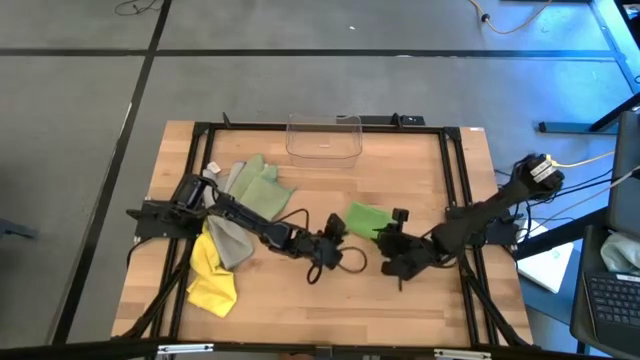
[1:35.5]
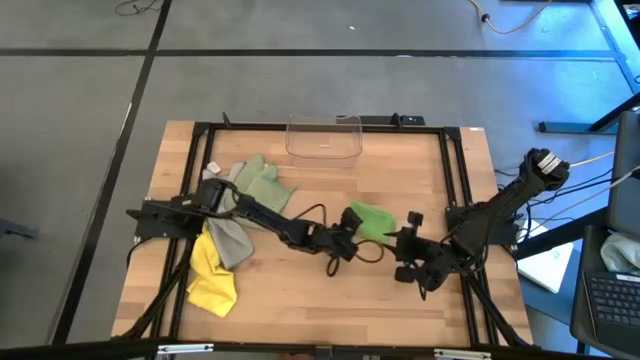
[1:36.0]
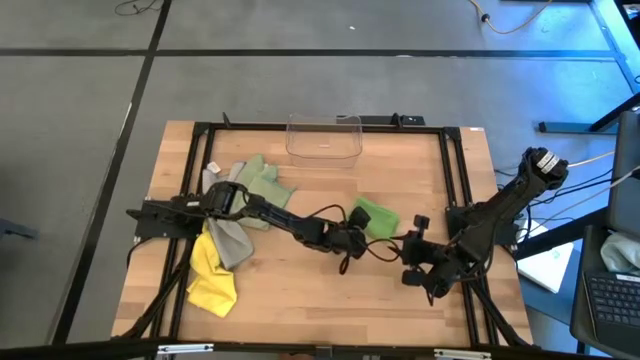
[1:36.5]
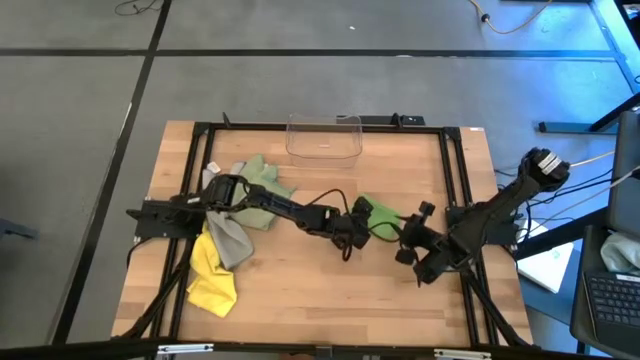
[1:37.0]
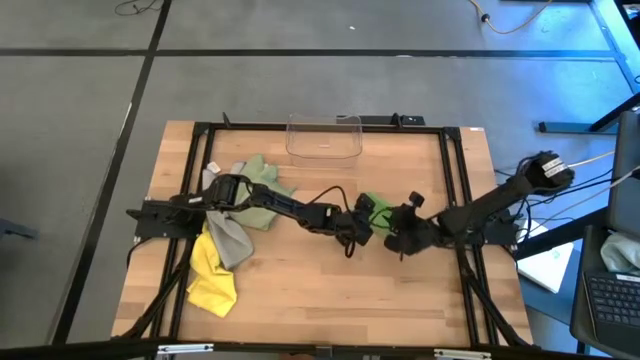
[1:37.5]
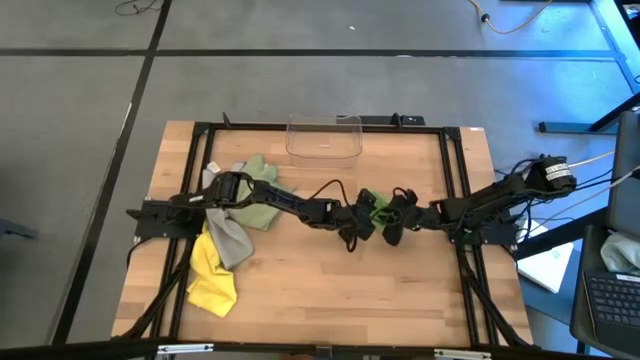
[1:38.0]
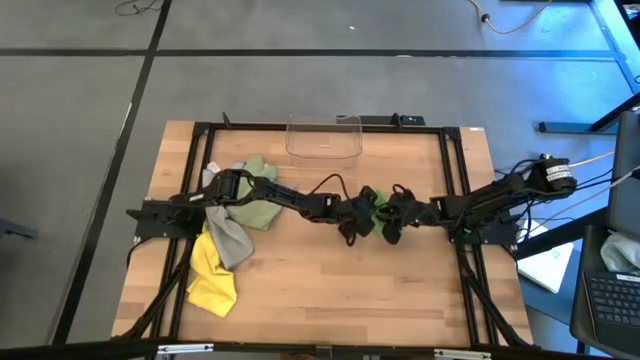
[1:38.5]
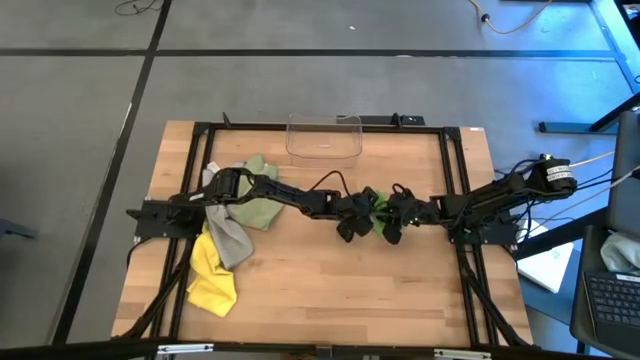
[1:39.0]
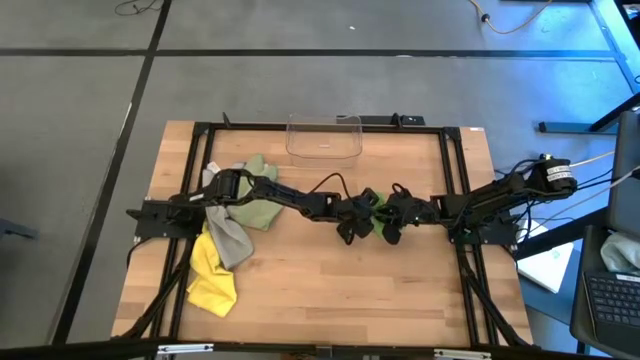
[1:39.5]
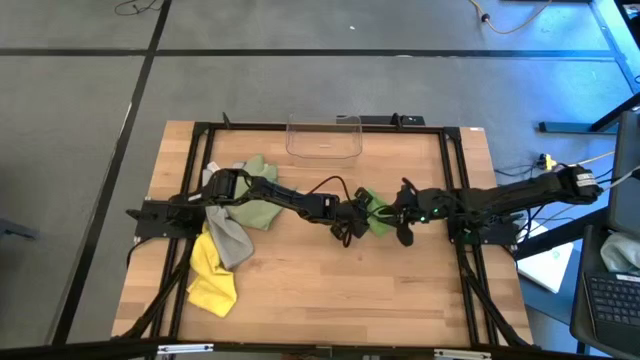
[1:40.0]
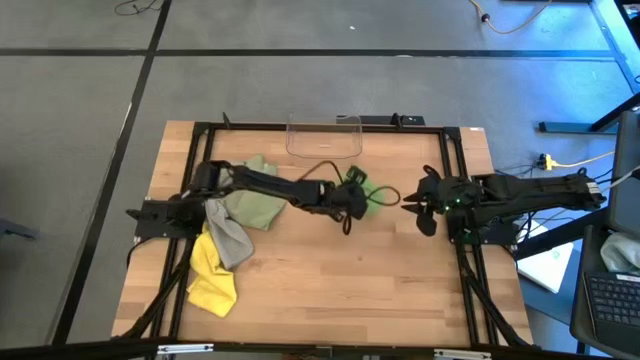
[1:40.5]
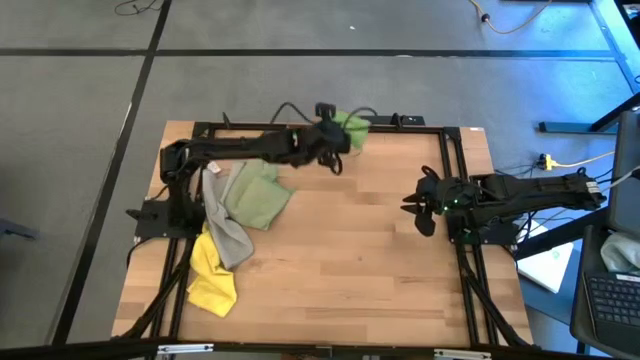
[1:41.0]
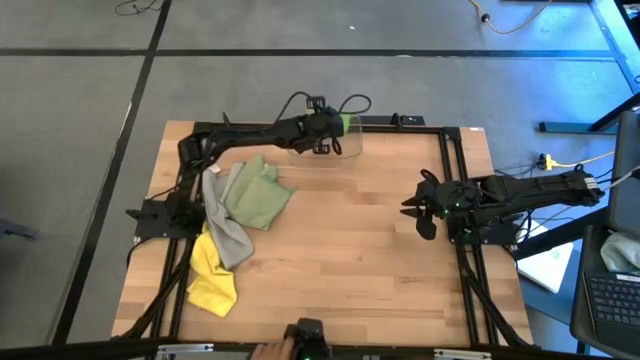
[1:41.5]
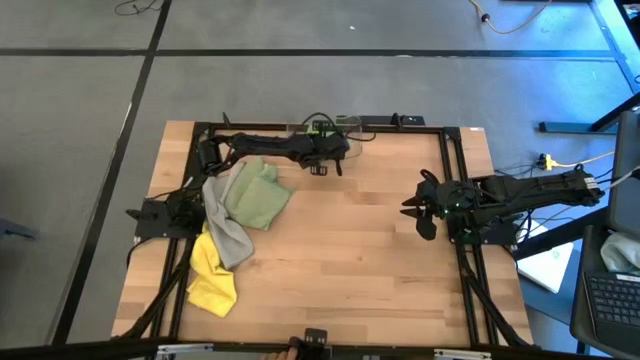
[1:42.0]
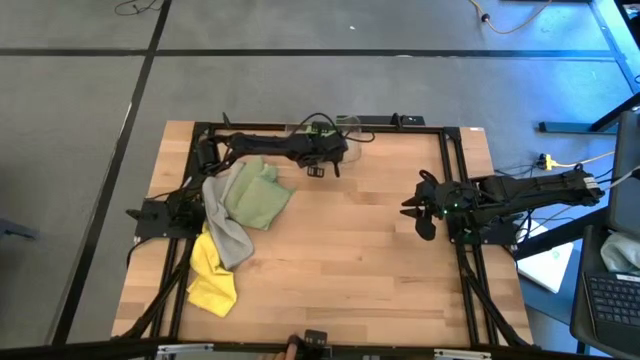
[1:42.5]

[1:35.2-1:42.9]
Task: Fold microfiber towels
Put the green microfiber cloth into the transparent bin

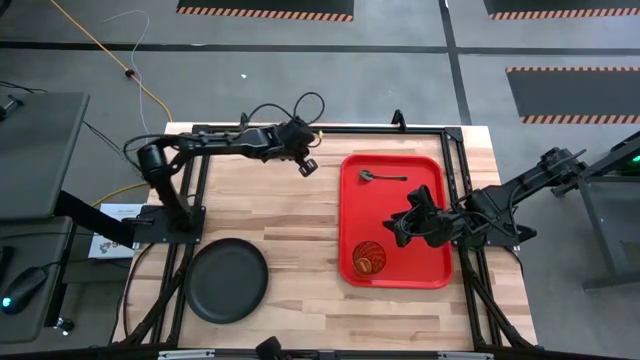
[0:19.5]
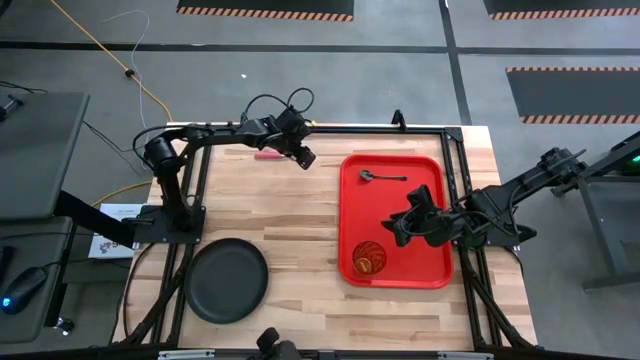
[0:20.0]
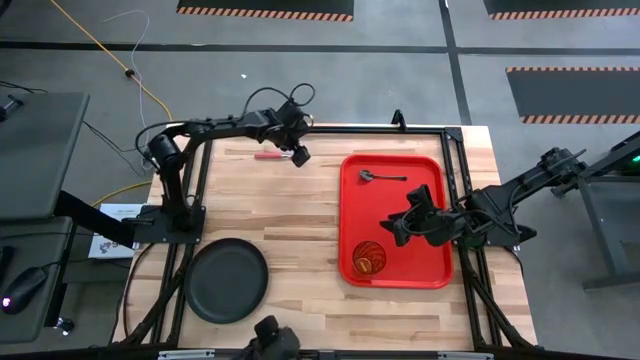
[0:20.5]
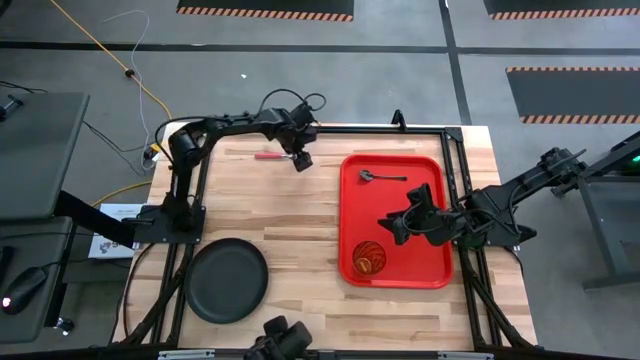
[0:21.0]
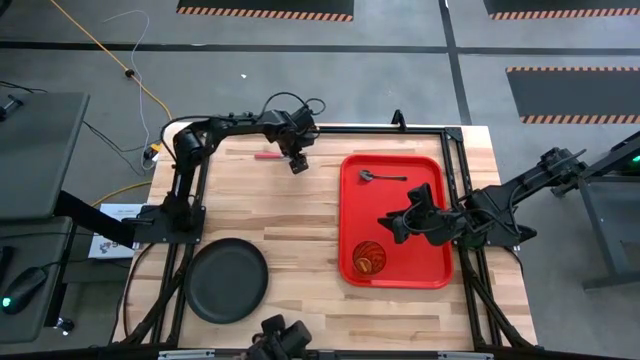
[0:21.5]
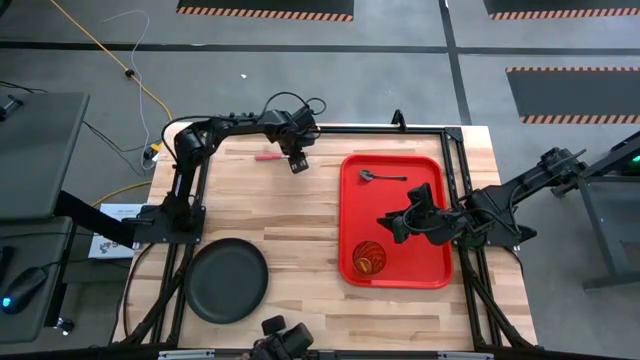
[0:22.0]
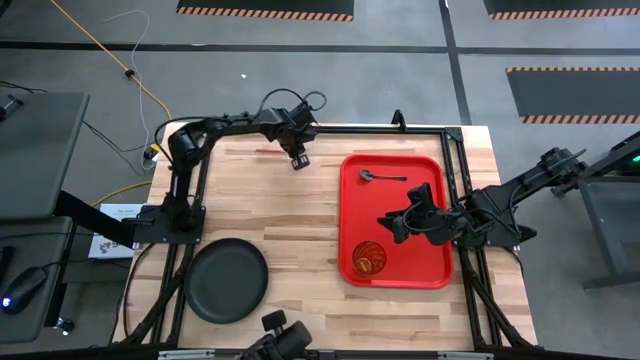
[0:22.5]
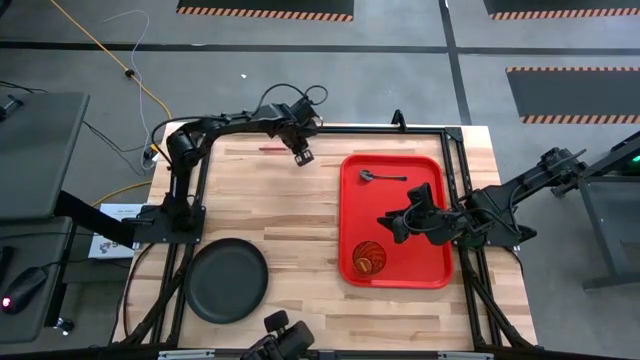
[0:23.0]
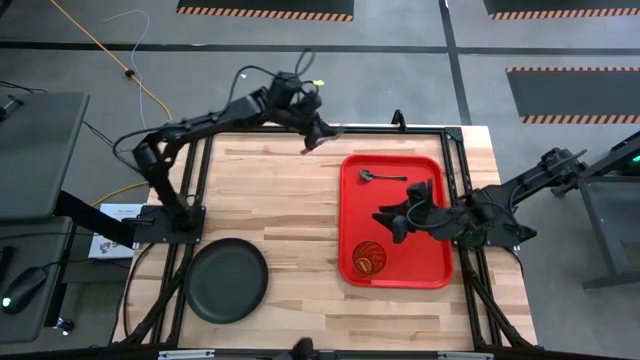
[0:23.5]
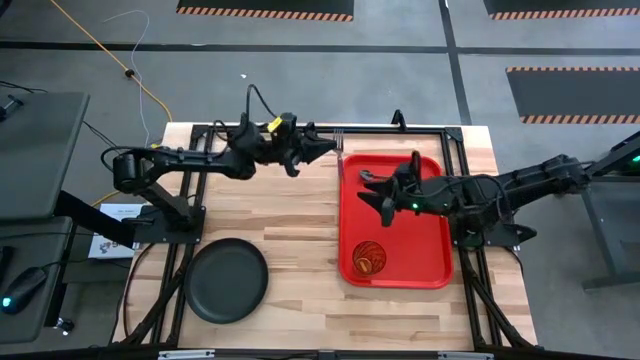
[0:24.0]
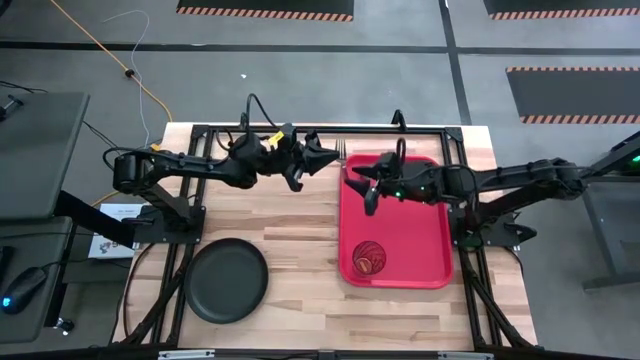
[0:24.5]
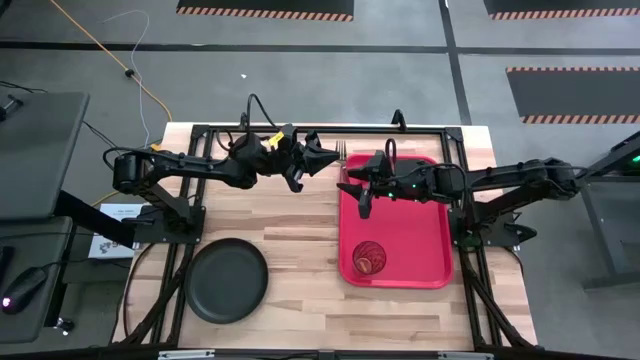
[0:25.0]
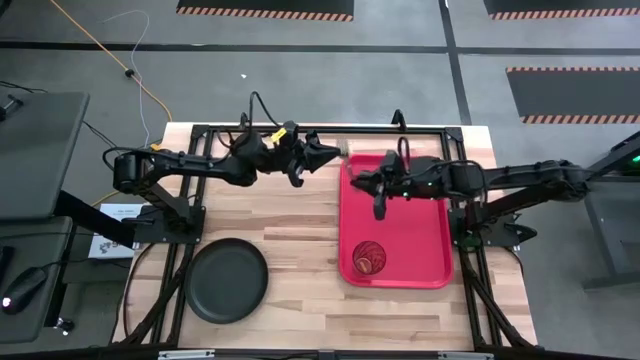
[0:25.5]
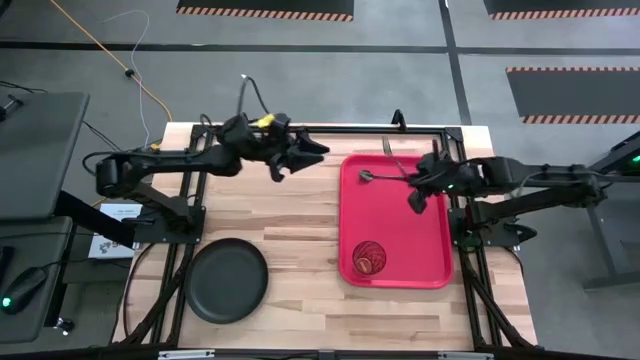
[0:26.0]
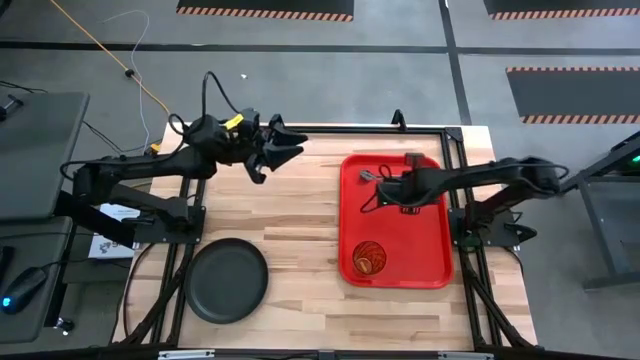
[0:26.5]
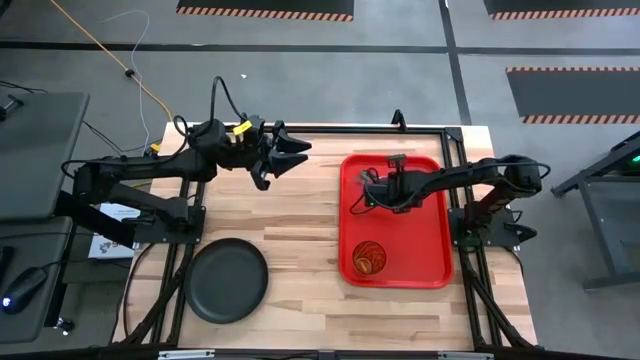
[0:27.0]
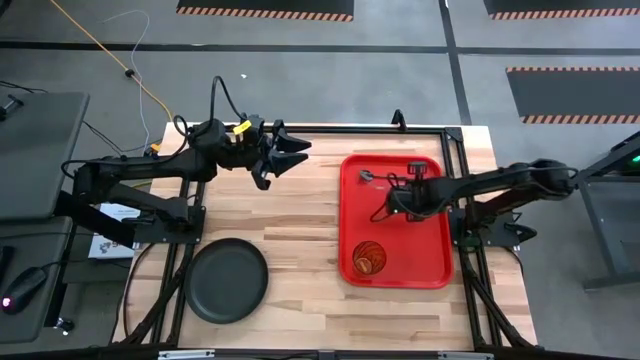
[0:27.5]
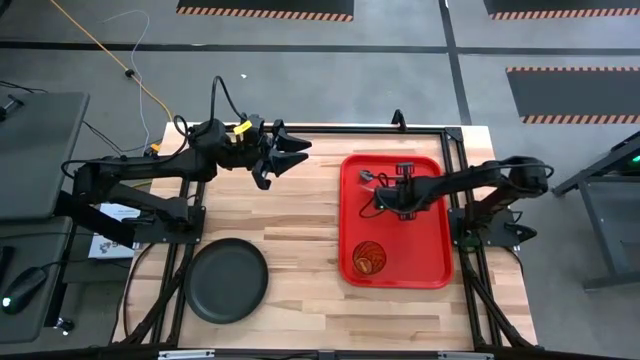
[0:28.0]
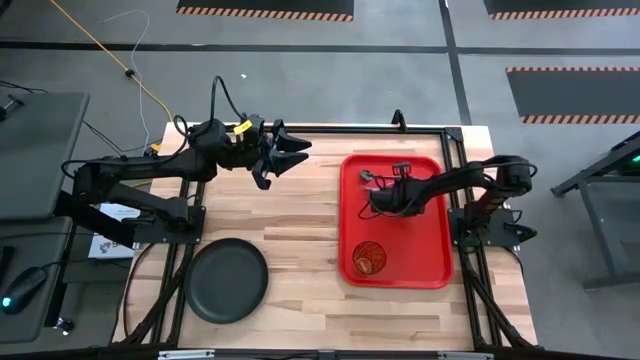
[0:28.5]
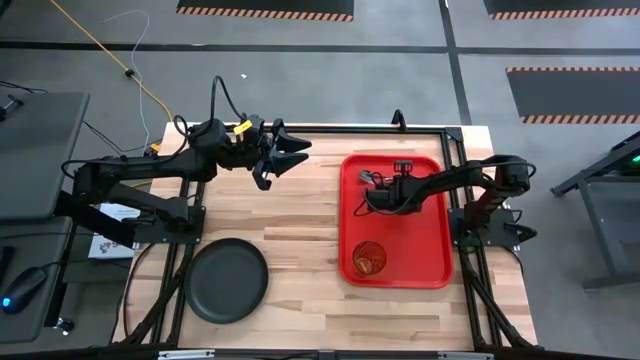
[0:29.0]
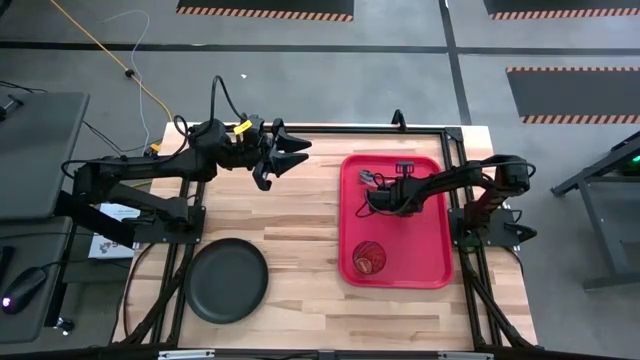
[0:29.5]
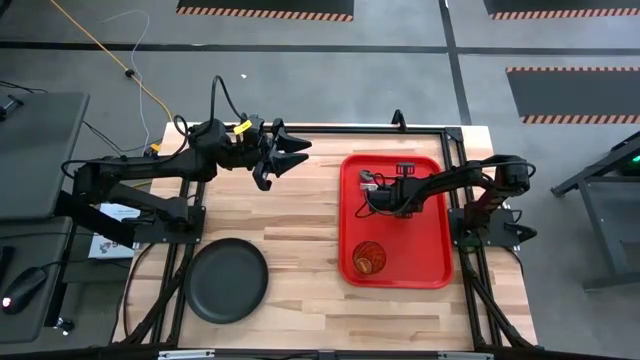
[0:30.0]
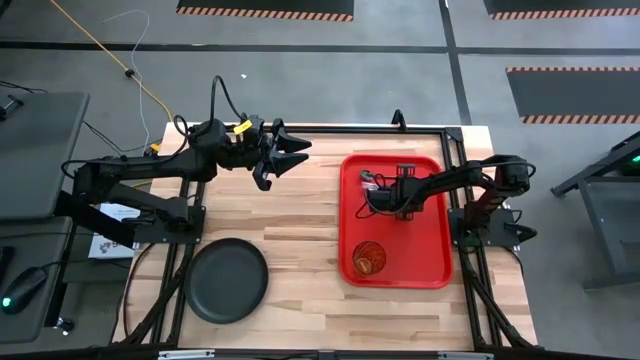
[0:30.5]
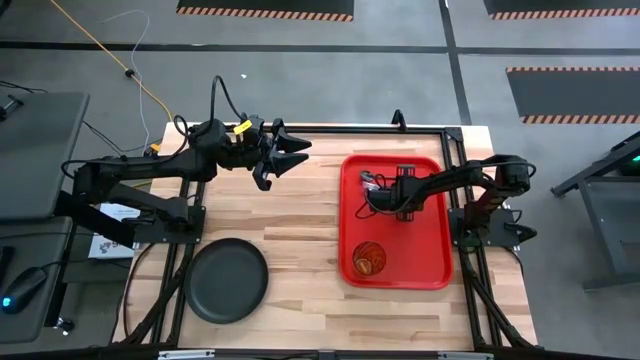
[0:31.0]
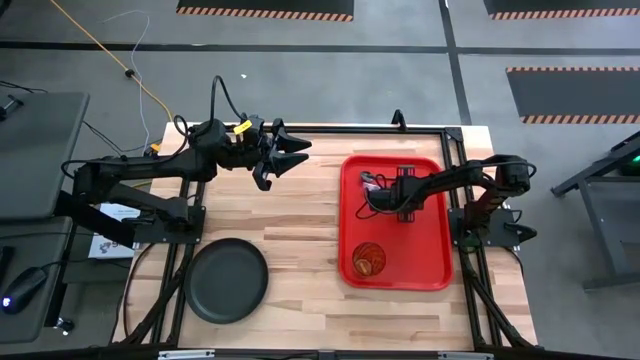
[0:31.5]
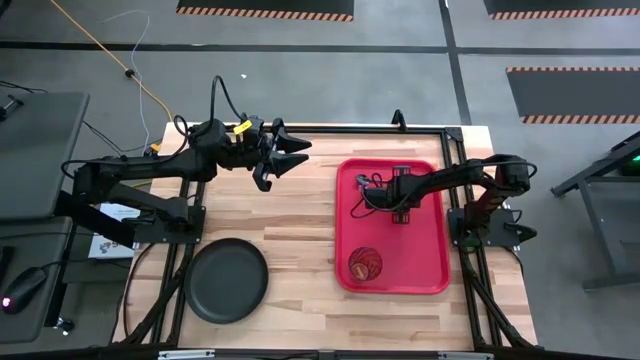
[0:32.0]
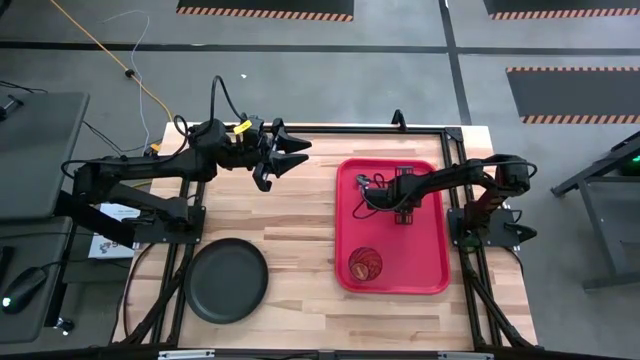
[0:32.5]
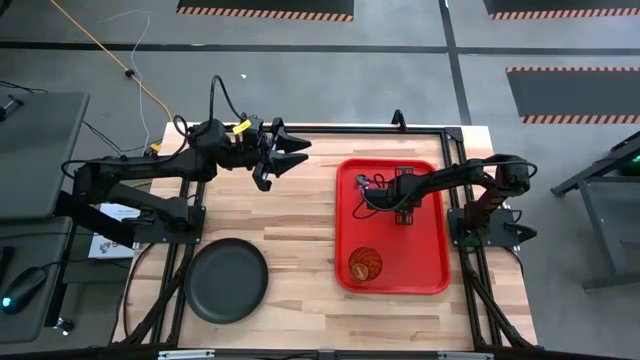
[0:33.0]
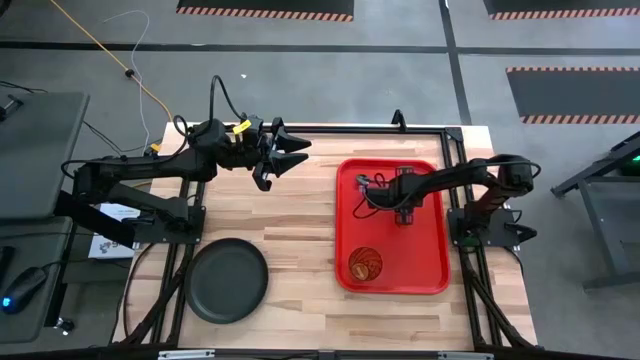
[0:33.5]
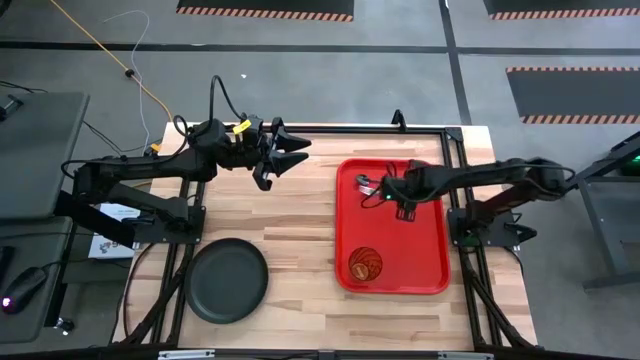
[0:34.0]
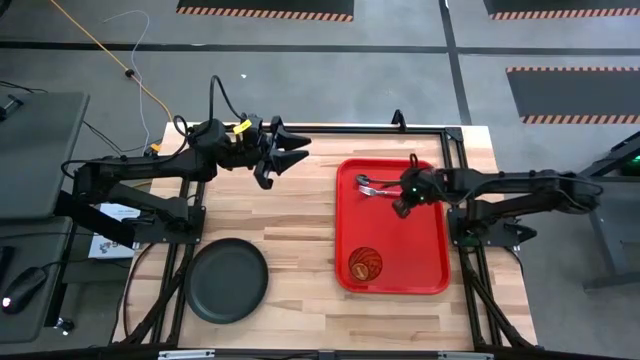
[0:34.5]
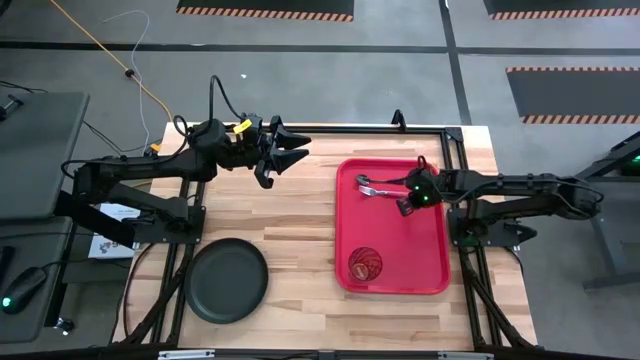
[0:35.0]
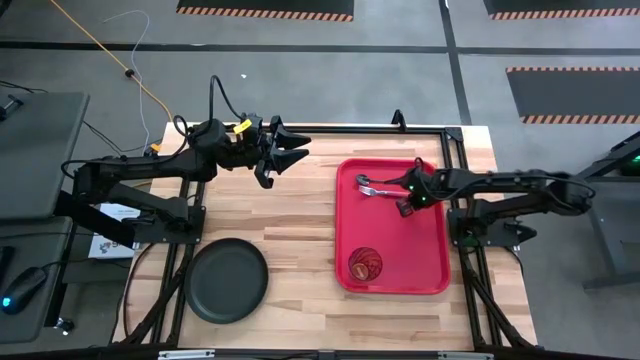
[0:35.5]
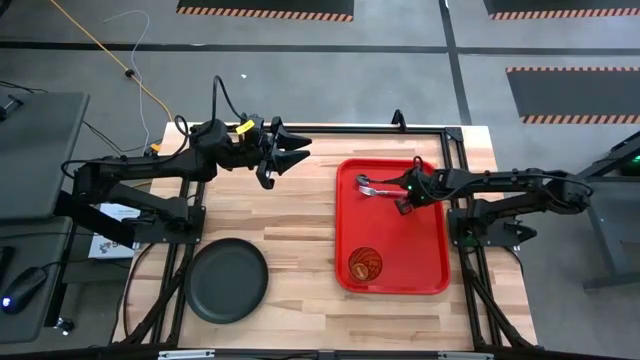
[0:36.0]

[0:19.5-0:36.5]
Task: Pick and place plate/cup/fork/spoon on tray
Put the red fork on the red serving tray beside the black spoon
